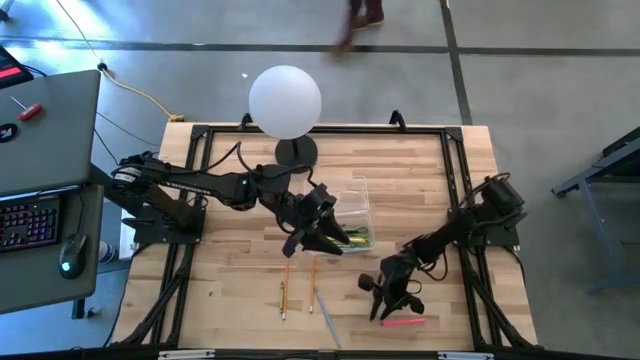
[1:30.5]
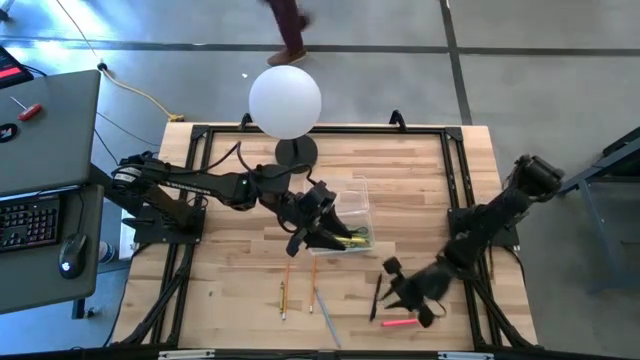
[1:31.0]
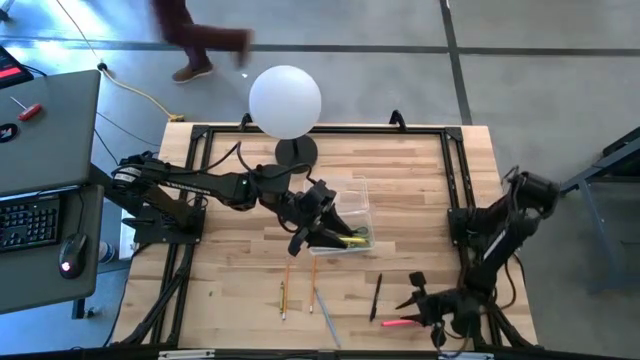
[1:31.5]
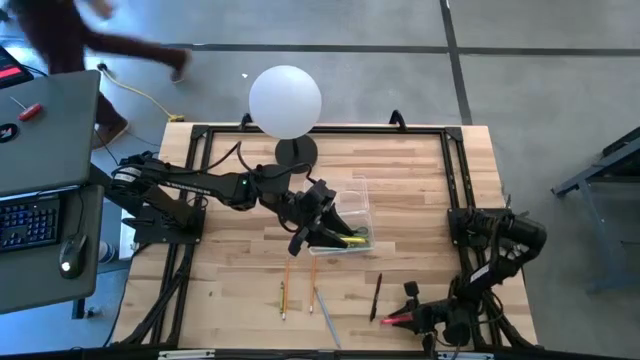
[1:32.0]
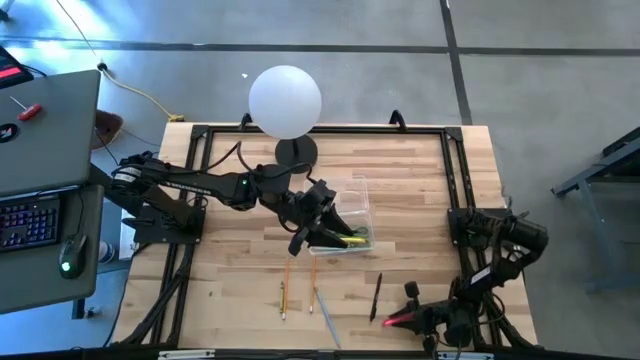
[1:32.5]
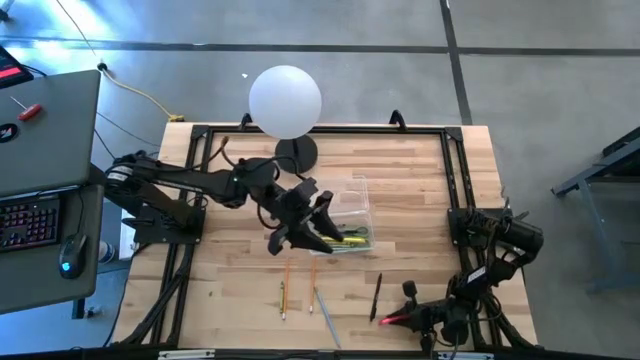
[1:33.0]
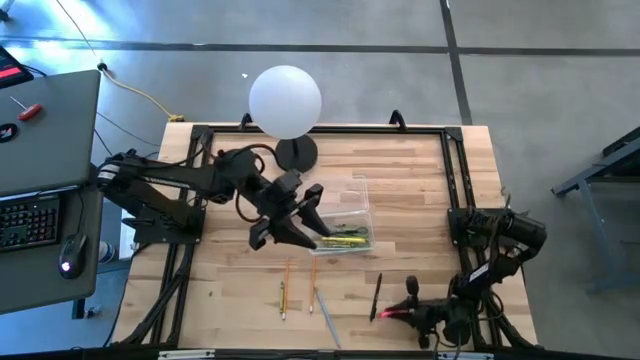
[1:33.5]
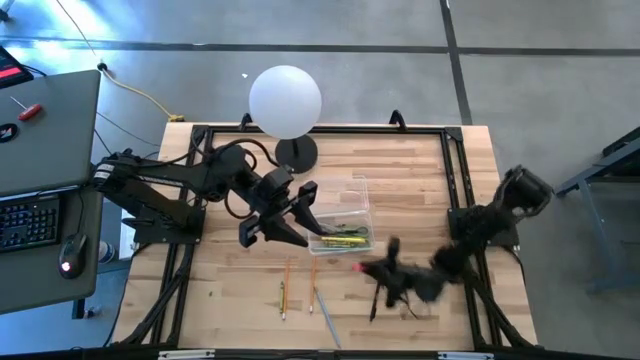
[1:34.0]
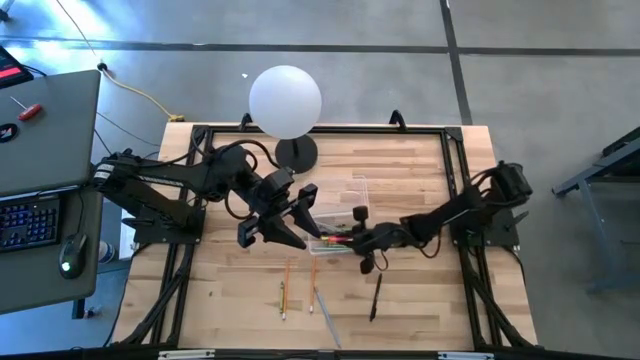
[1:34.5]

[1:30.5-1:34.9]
Task: Pick & place school supplies into a supply box
Put the pink pen into the transparent supply box

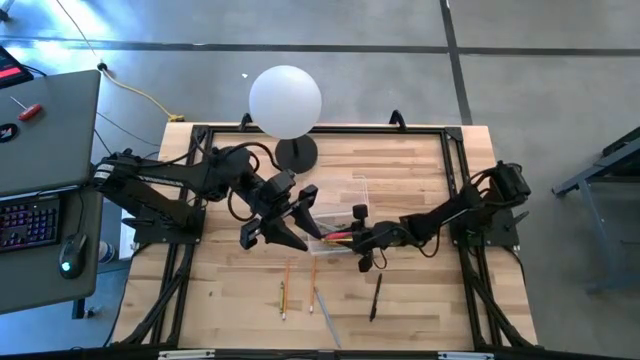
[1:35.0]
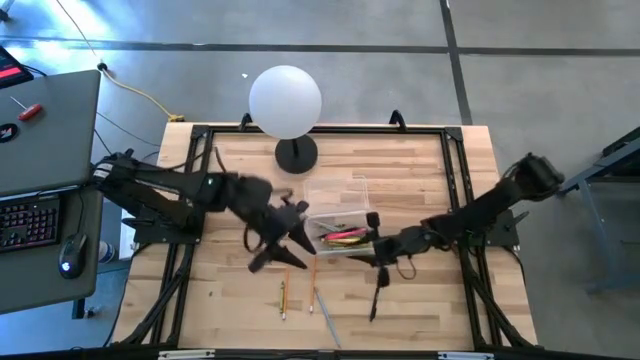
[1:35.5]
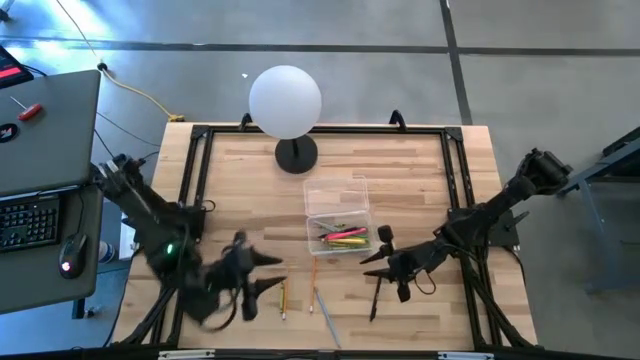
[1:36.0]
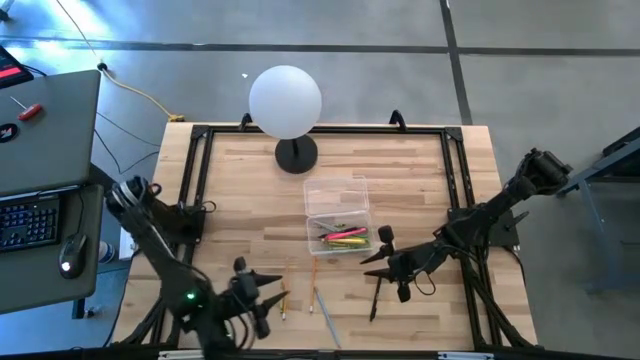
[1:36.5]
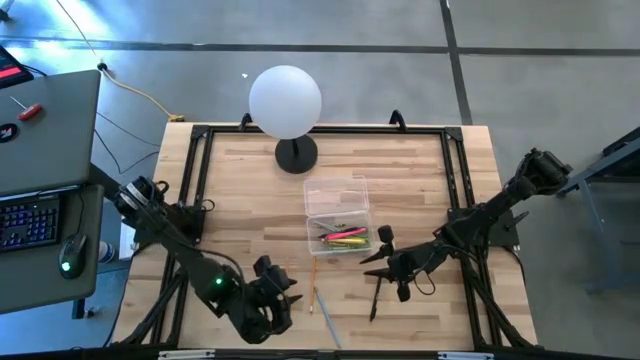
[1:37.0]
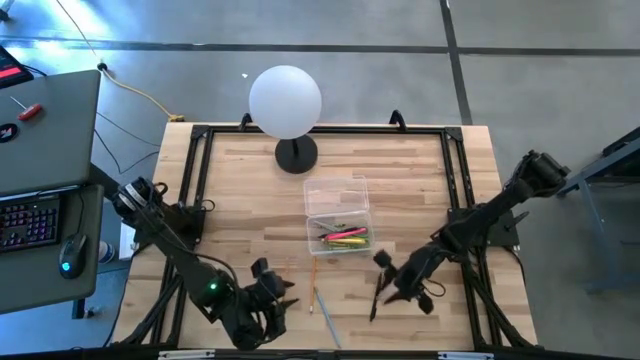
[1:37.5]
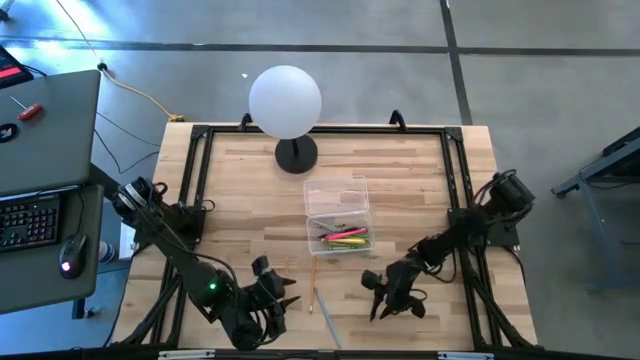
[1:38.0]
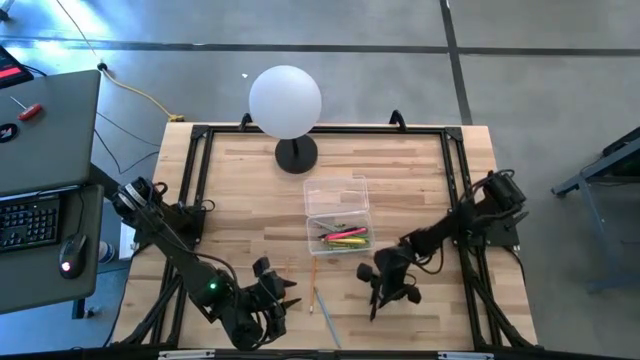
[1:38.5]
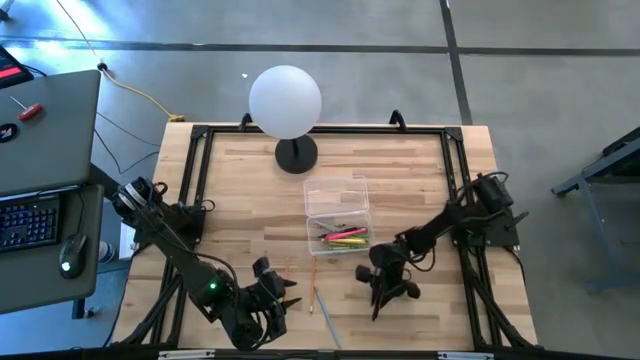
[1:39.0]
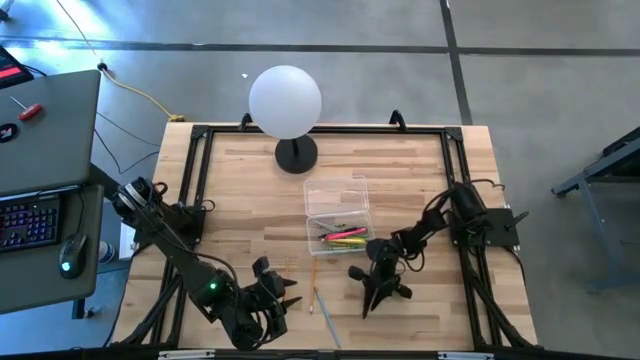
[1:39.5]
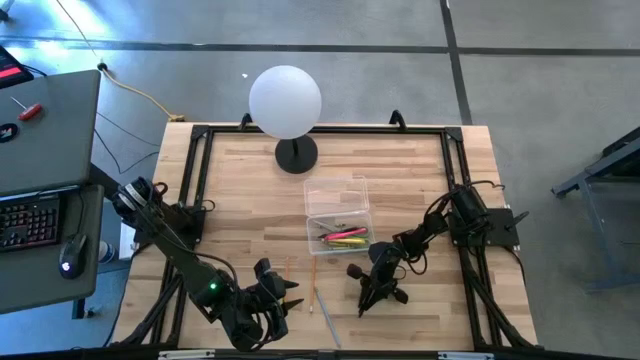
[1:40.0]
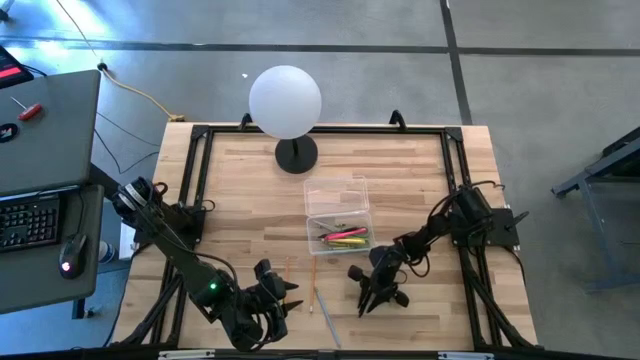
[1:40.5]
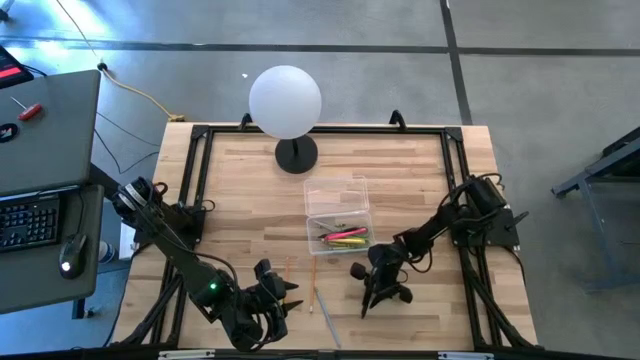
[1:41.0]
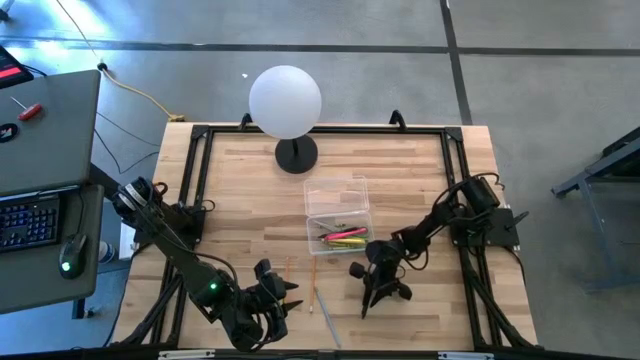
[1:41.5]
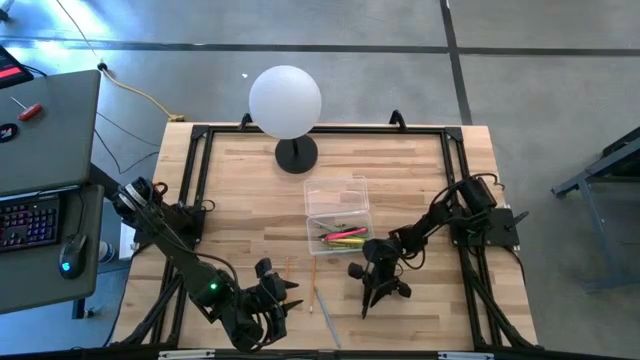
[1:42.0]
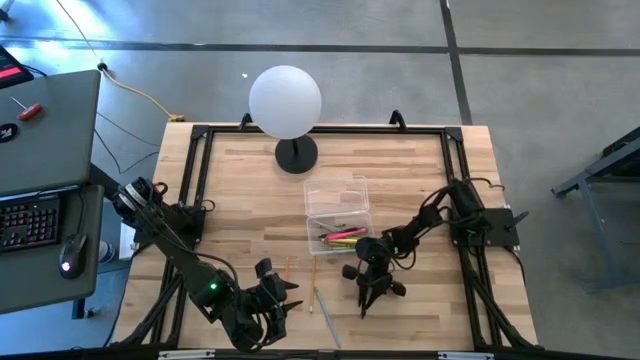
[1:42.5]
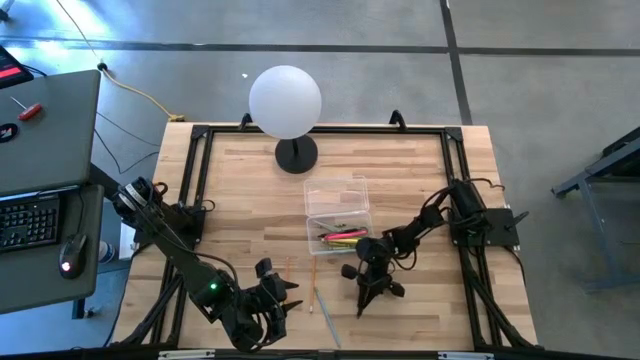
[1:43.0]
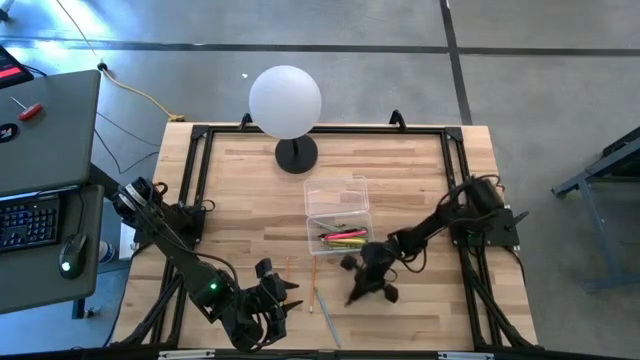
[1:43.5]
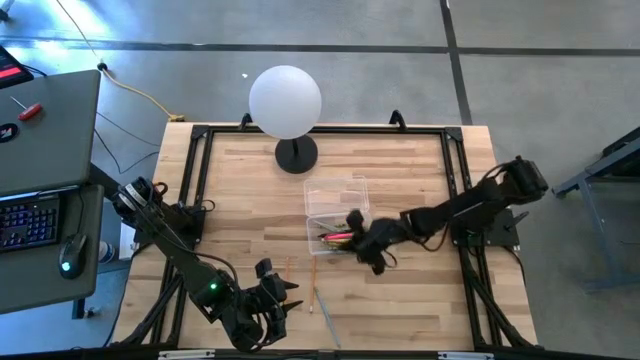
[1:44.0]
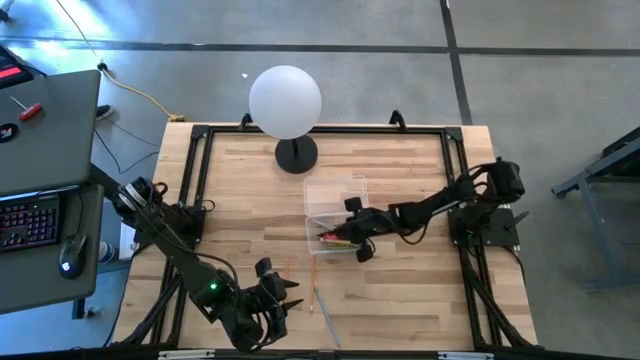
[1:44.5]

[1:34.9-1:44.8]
Put the black pen into the transparent supply box

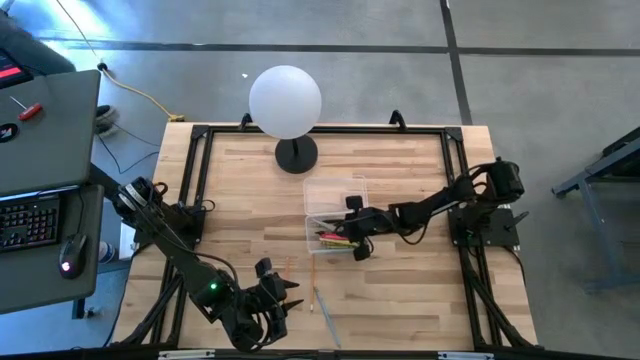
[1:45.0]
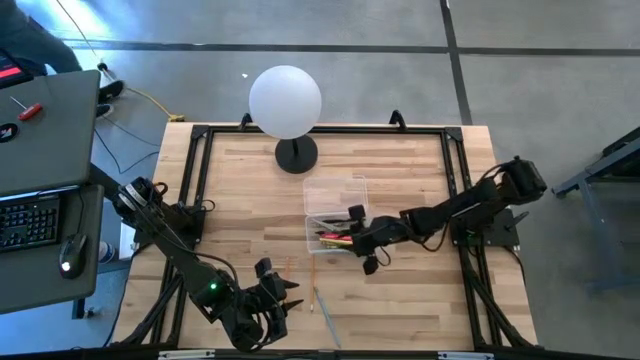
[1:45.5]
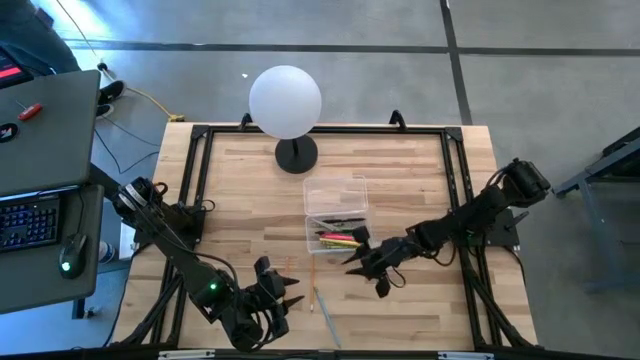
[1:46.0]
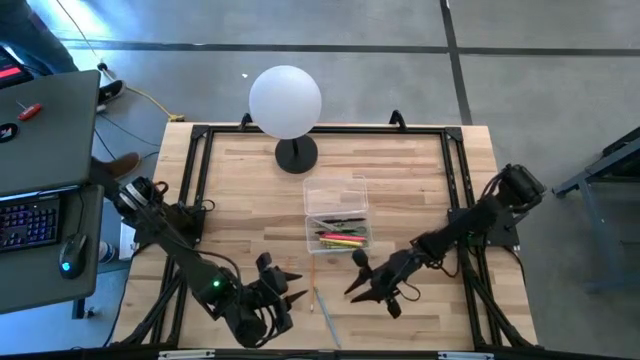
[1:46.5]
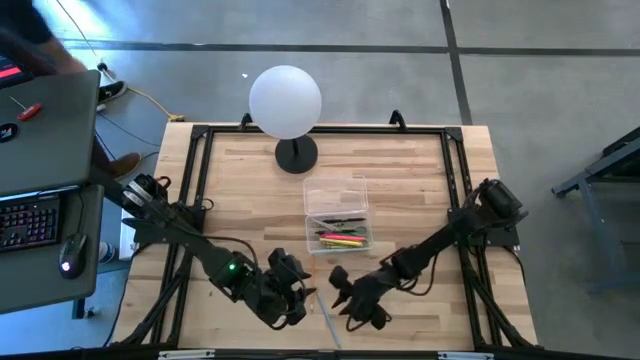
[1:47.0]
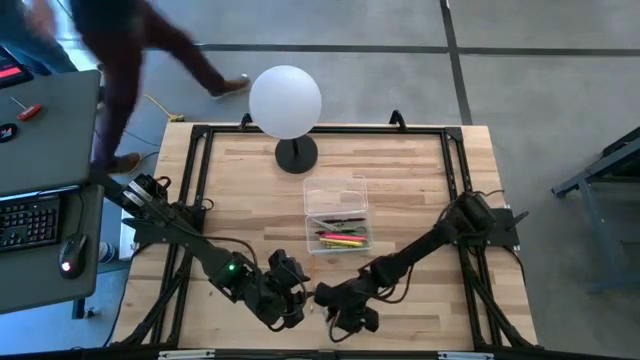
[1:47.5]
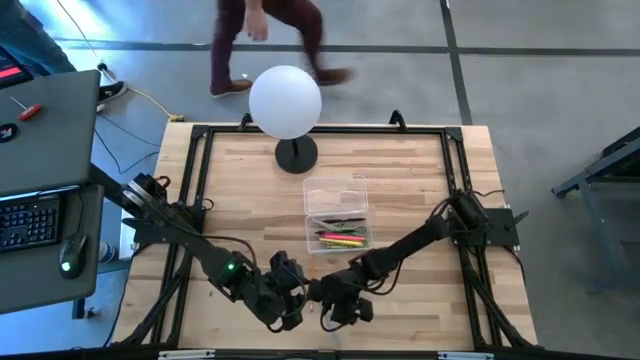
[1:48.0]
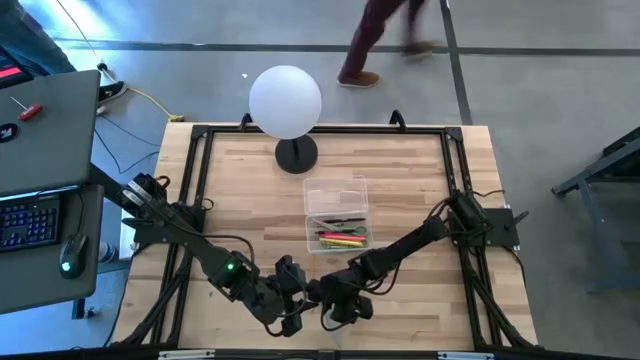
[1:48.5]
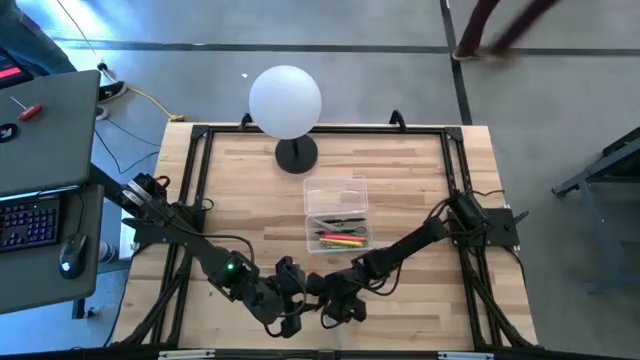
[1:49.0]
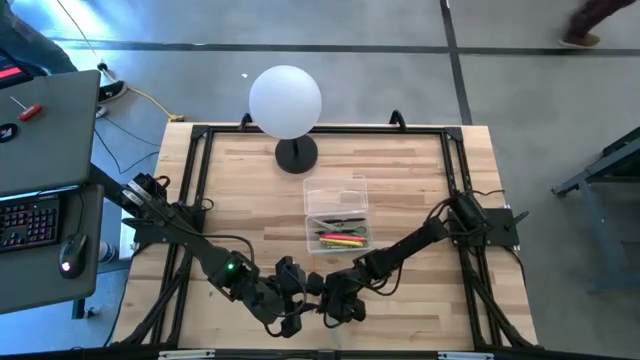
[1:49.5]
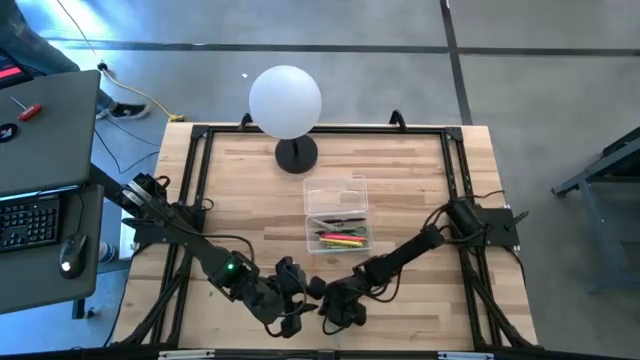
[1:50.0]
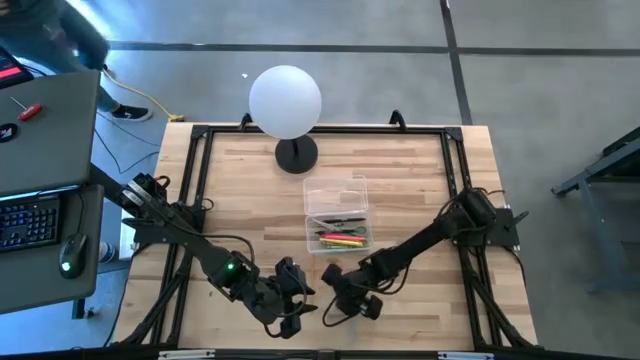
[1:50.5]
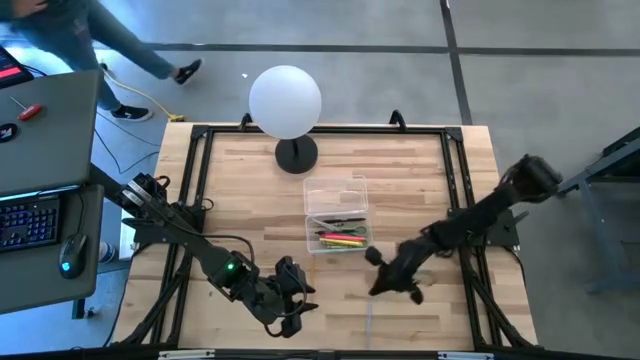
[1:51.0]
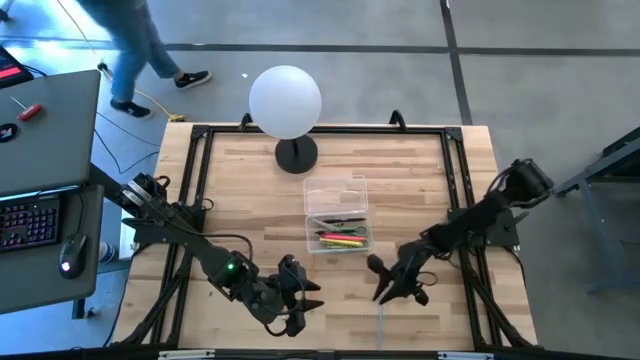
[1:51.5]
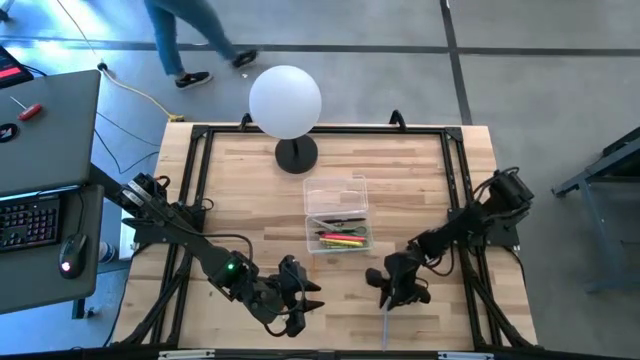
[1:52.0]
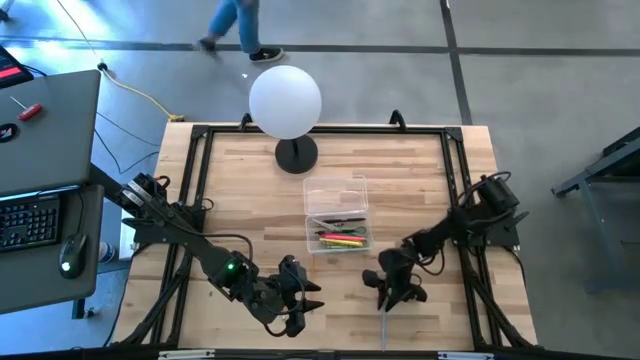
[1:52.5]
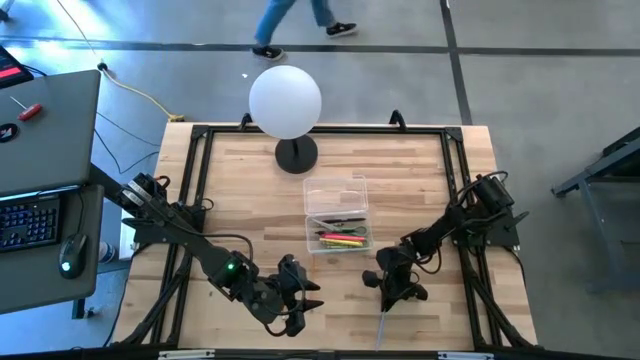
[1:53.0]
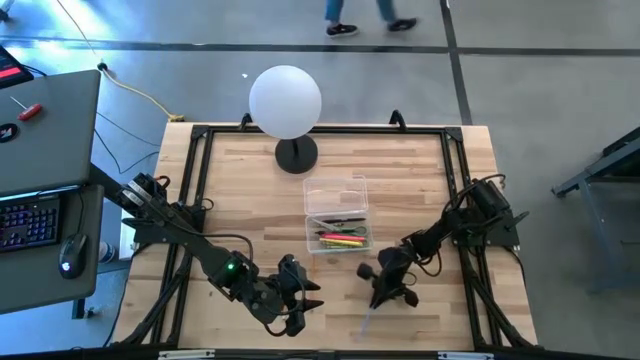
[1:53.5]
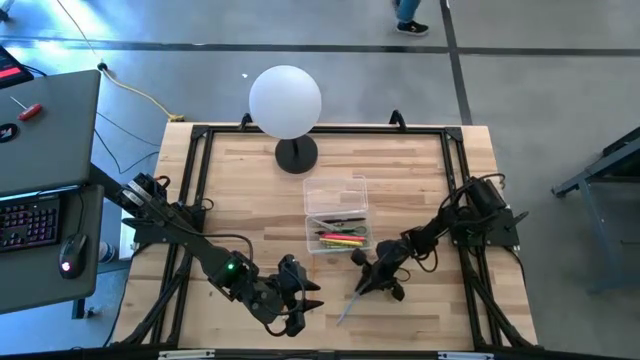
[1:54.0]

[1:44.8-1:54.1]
Put the blue pencil into the transparent supply box
